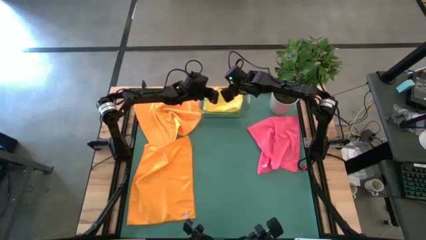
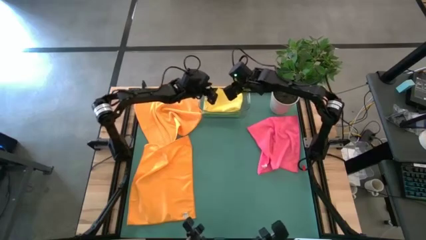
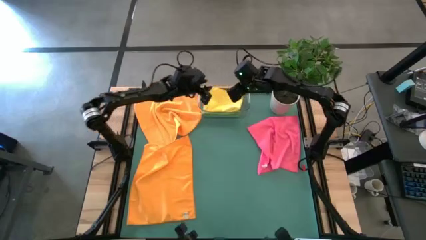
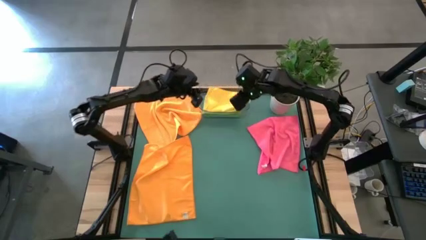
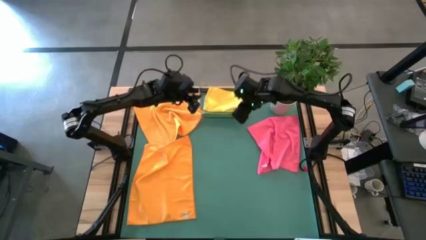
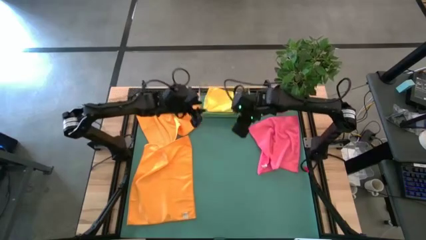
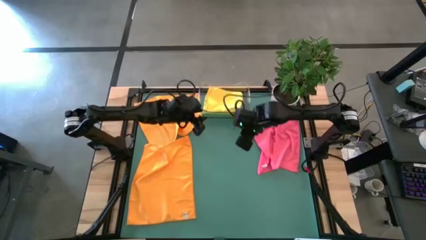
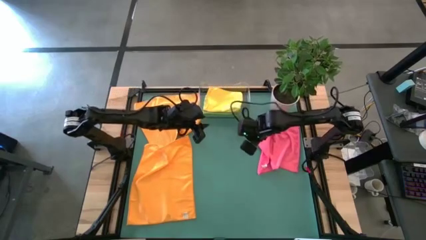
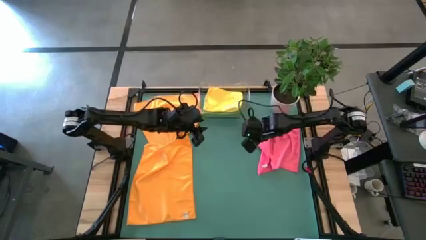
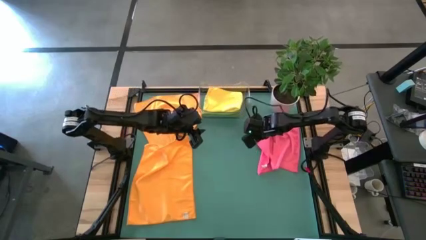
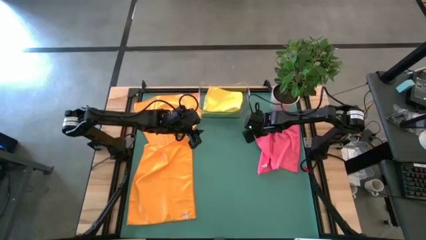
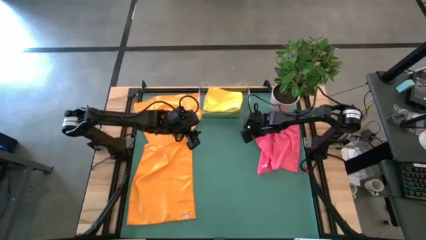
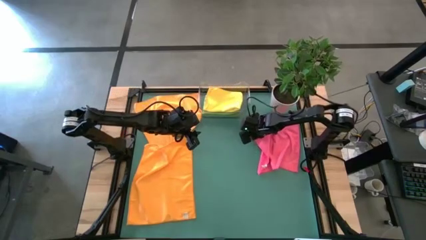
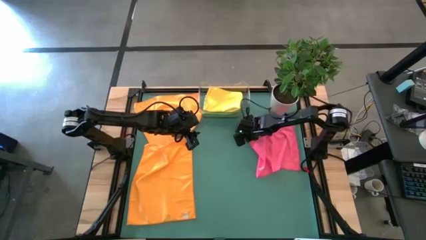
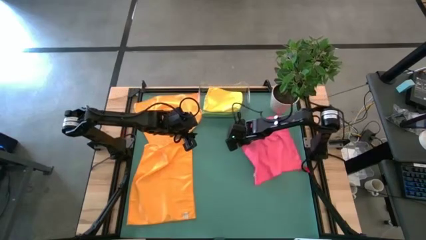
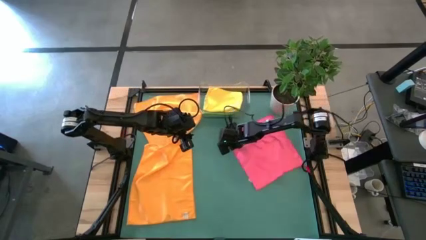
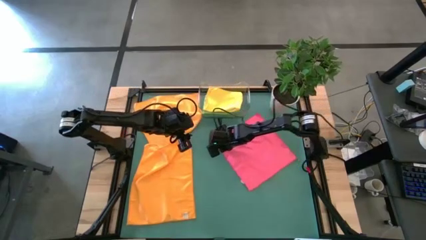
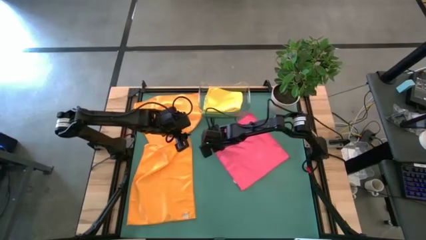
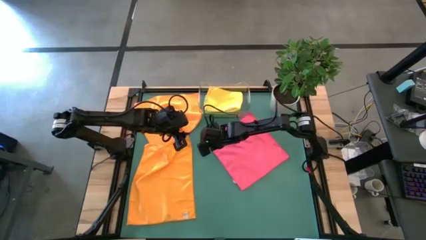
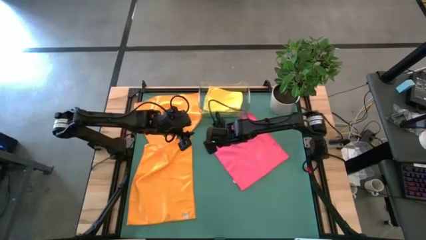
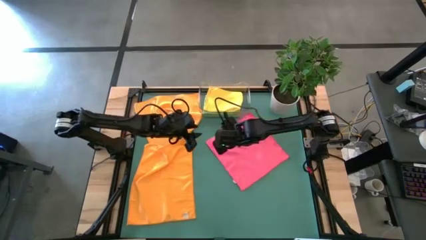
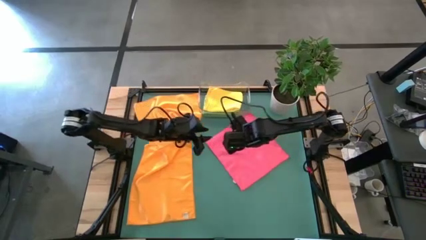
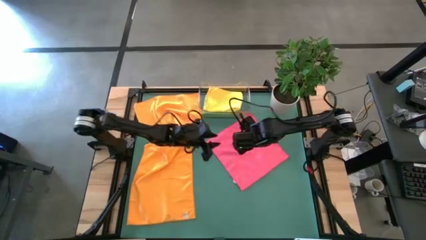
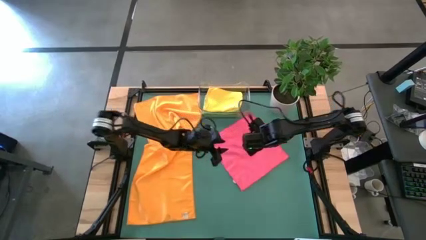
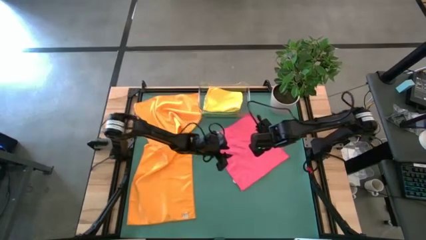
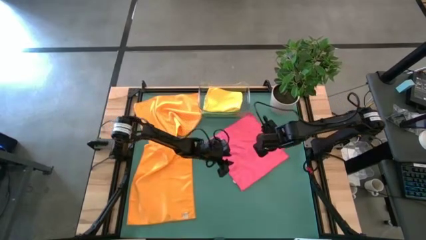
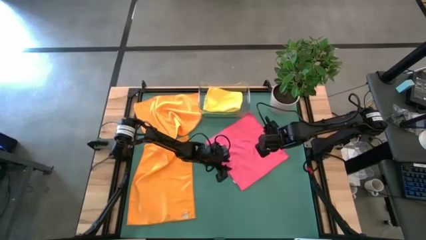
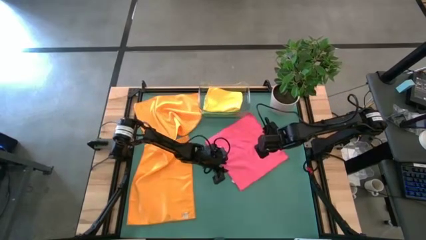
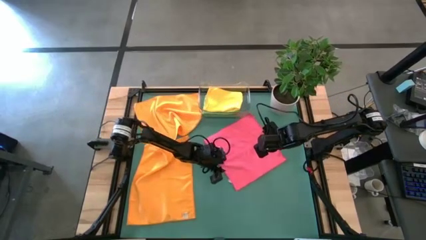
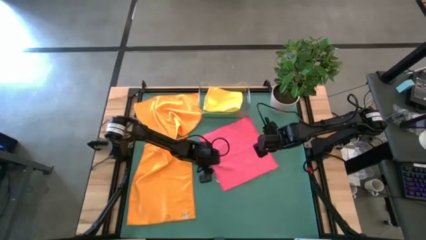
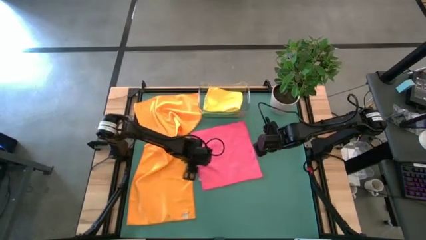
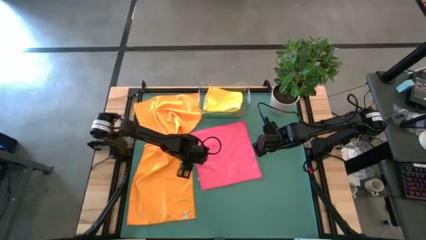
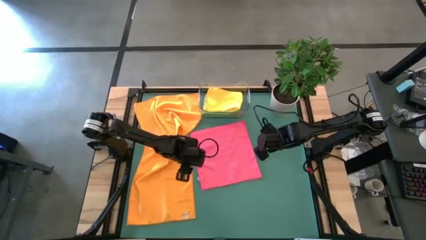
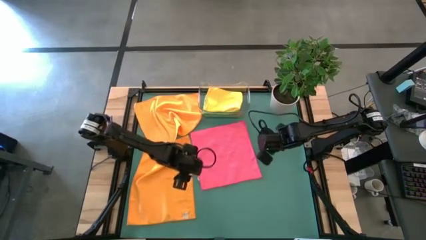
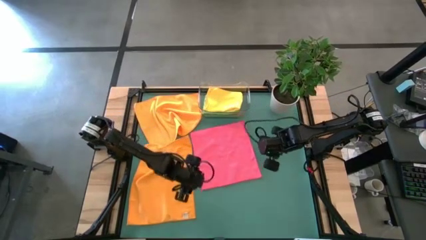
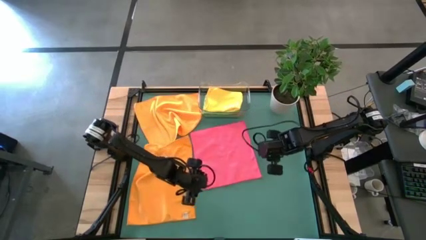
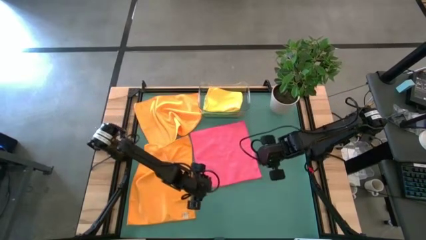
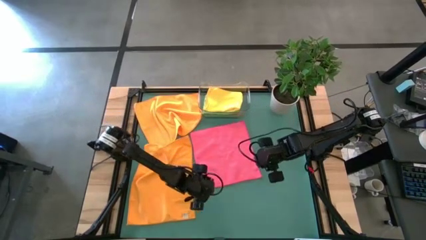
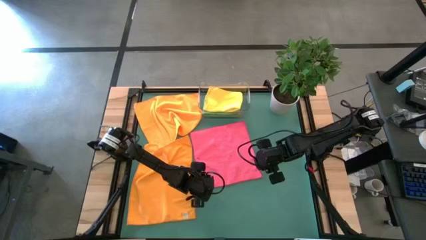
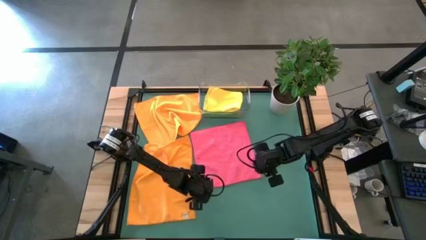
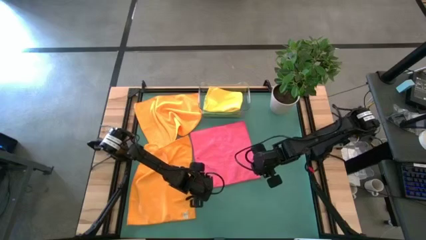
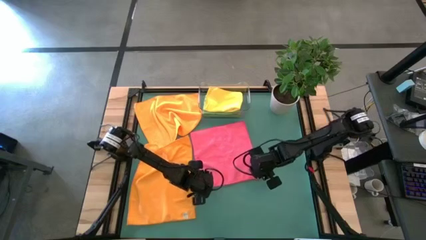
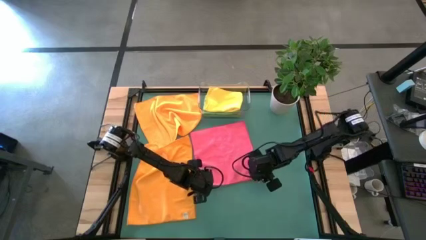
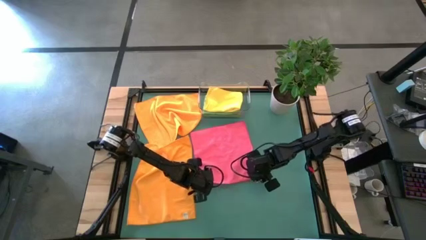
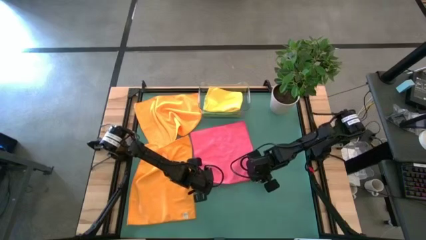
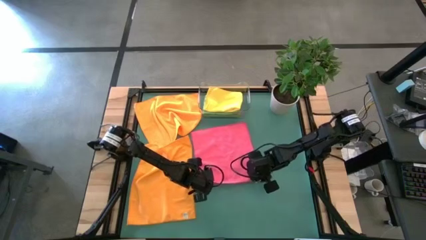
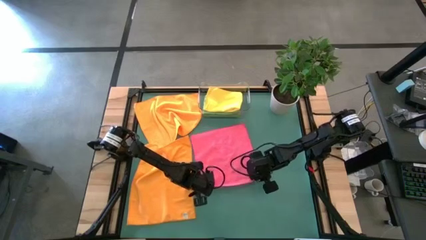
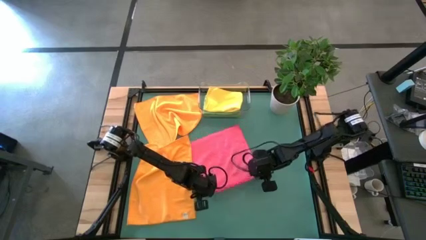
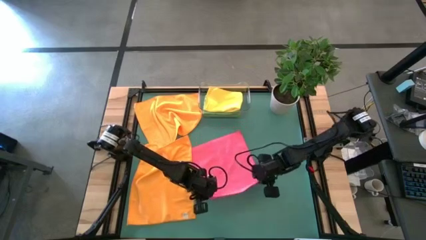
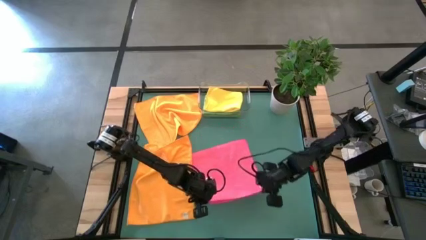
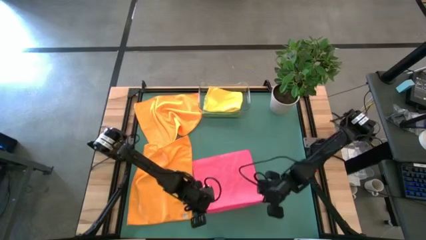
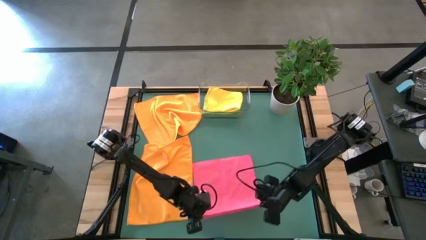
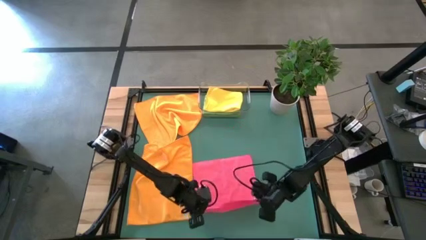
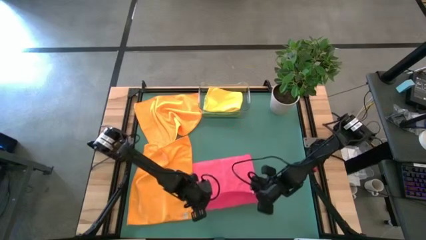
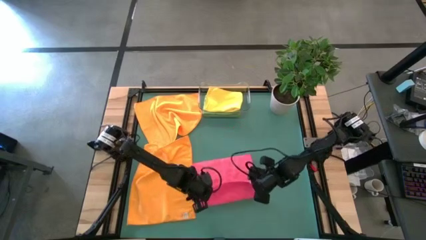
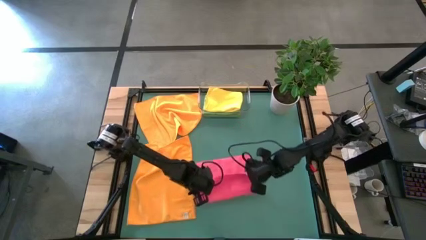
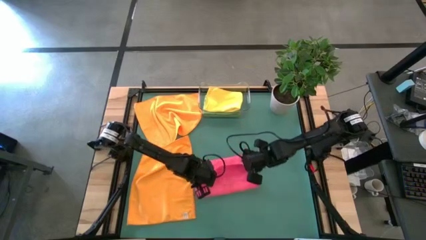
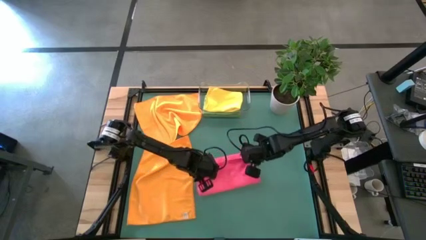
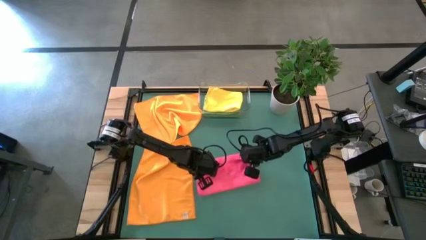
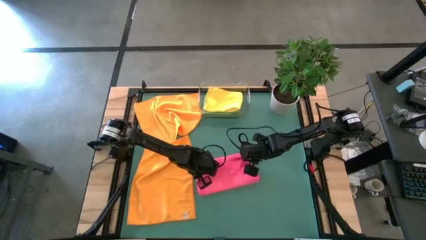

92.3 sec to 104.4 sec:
Task: Fold microfiber towels
Fold the pink towel

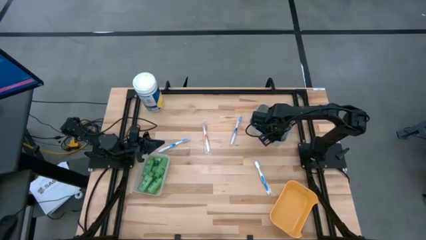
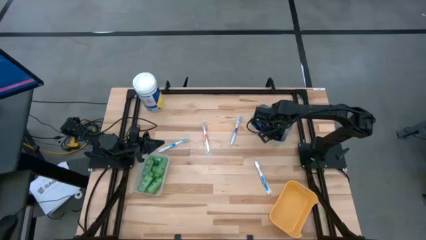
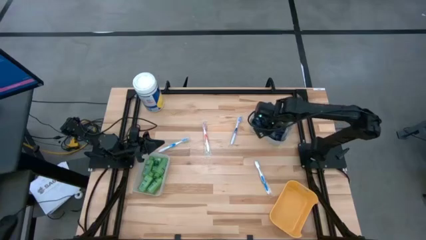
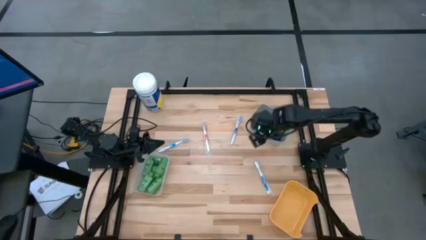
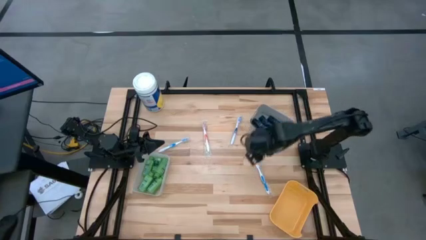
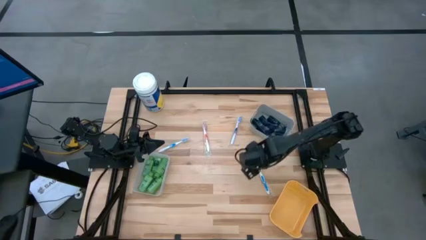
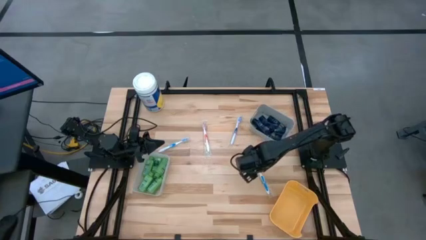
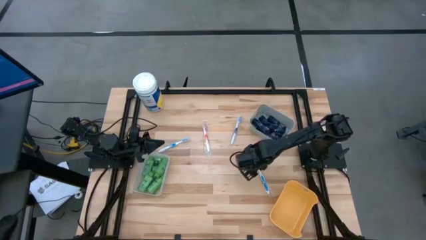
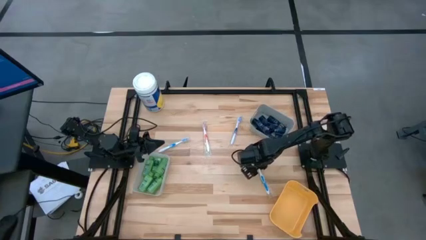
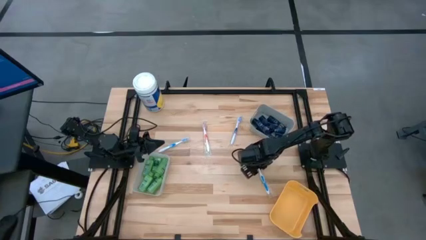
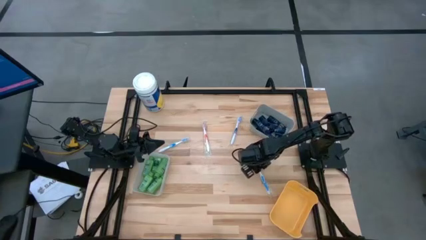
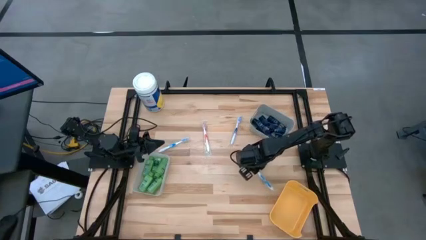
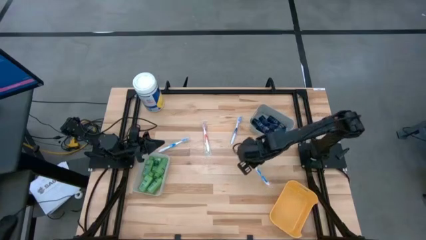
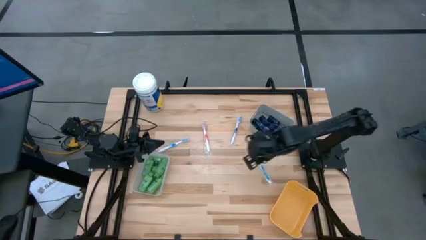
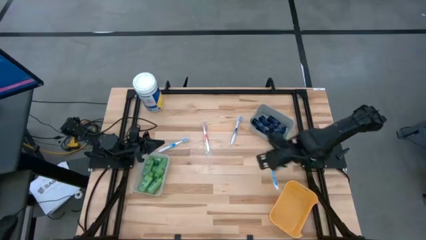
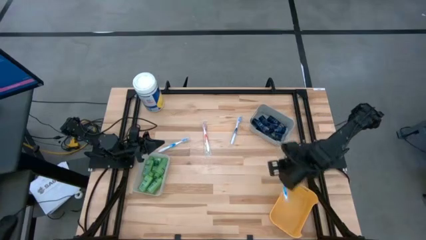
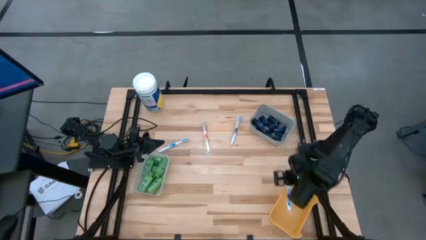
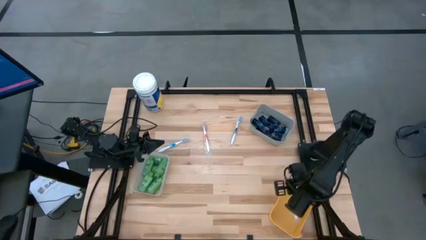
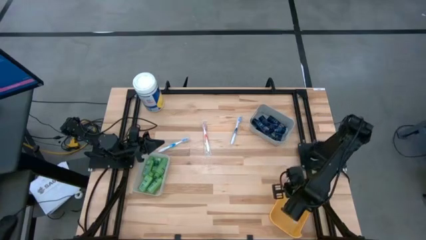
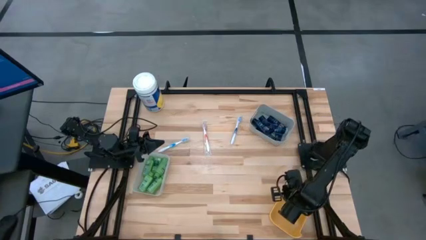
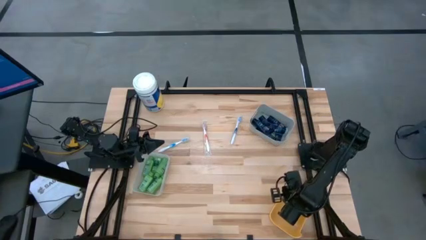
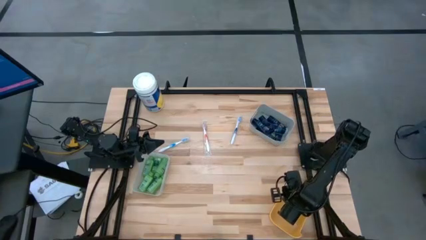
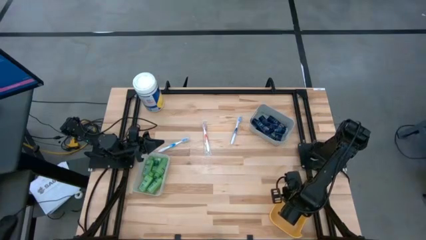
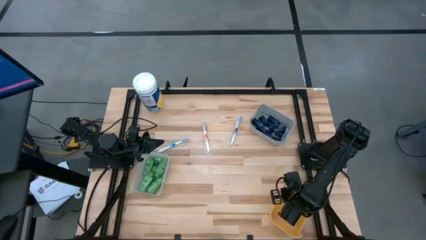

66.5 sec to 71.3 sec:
Task: Pick & Place Travel size toiletries
Put the blue toothbrush into the yellow bin

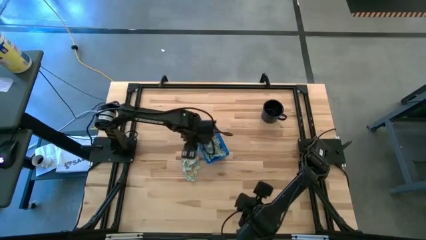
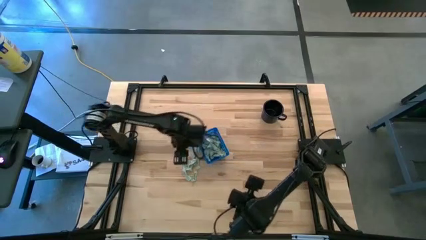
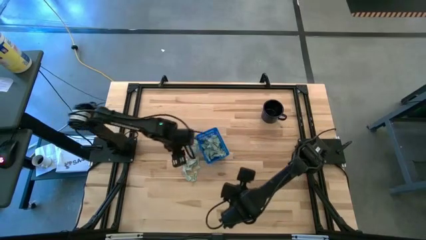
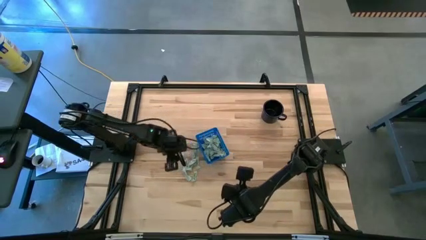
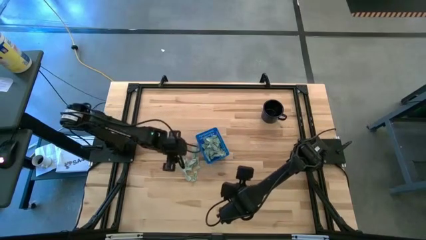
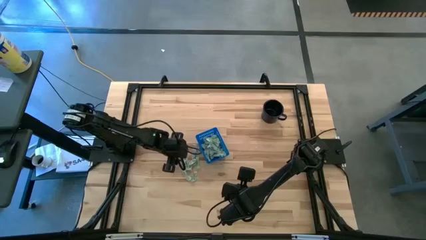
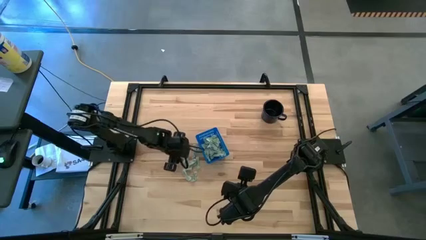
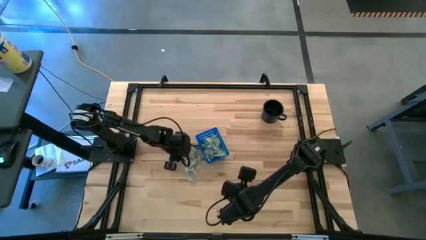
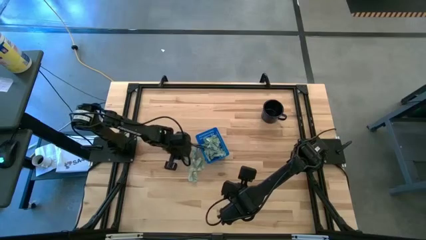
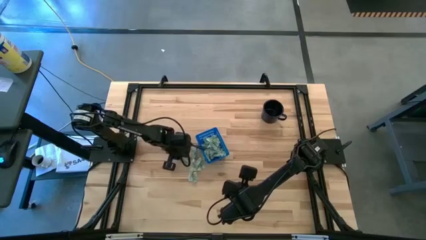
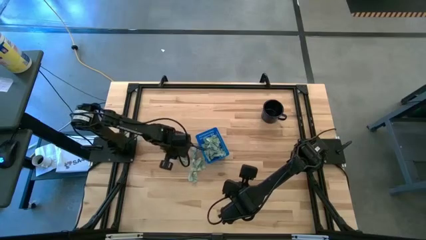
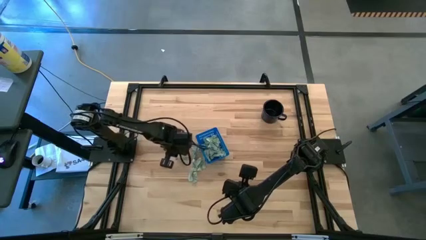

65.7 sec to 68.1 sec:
Task: Pick and place Stevia / Truvia into bins
Put the stevia packet into the basket
